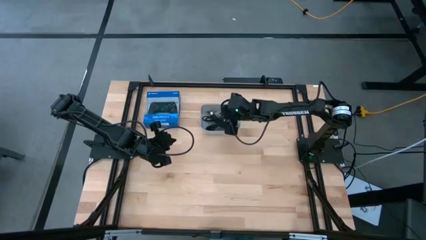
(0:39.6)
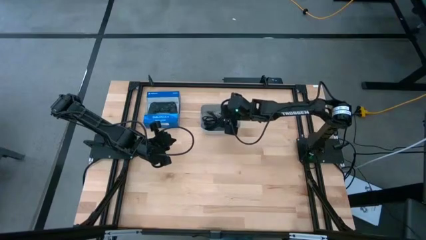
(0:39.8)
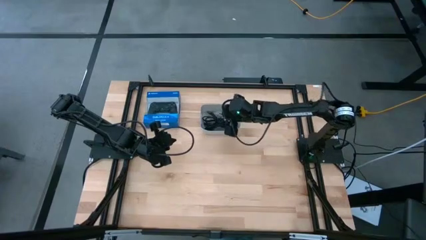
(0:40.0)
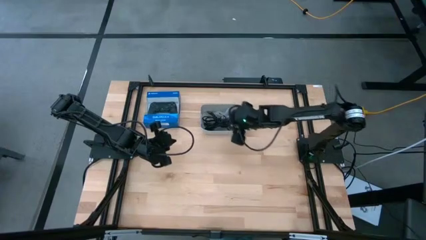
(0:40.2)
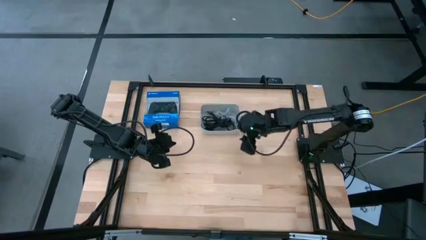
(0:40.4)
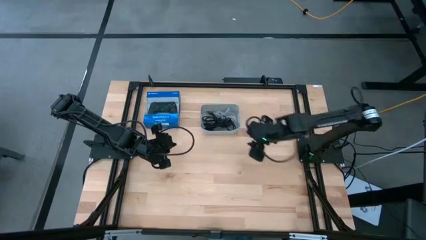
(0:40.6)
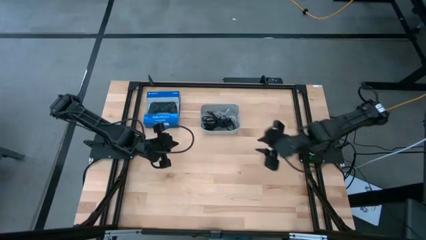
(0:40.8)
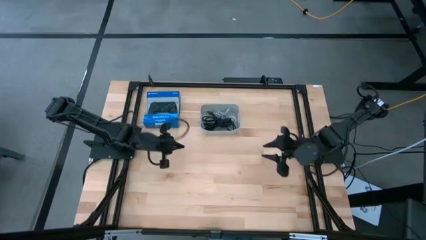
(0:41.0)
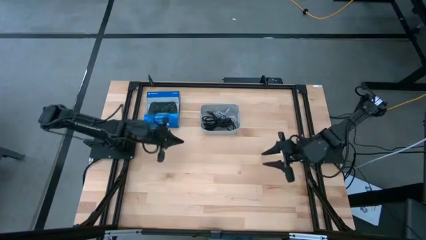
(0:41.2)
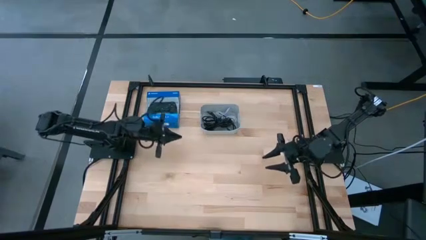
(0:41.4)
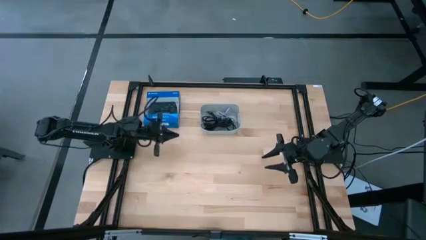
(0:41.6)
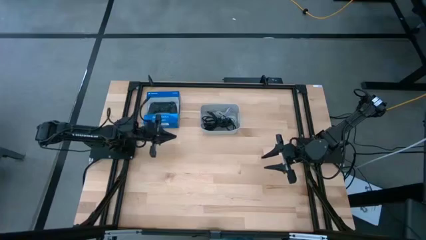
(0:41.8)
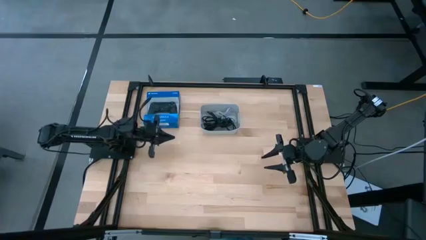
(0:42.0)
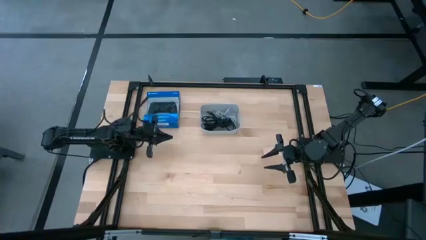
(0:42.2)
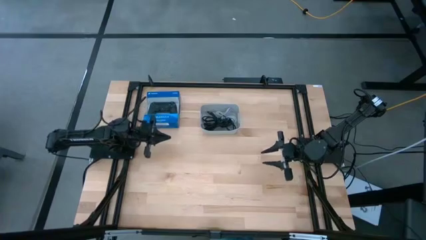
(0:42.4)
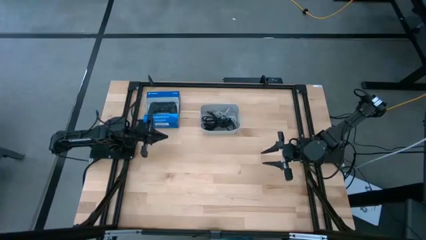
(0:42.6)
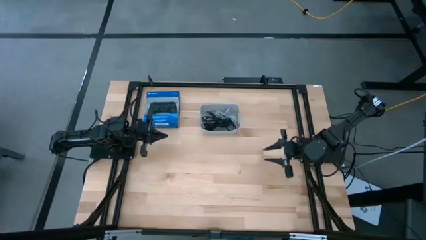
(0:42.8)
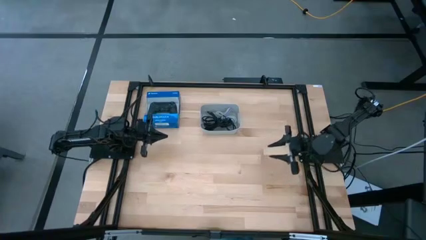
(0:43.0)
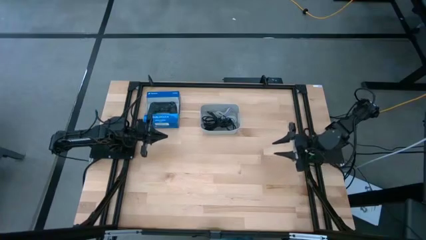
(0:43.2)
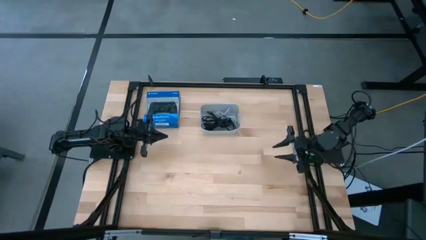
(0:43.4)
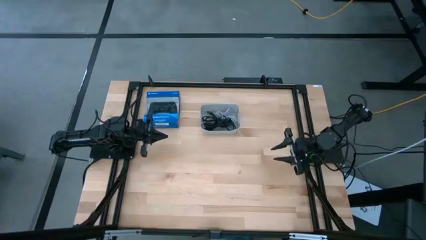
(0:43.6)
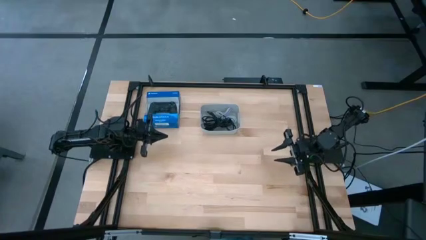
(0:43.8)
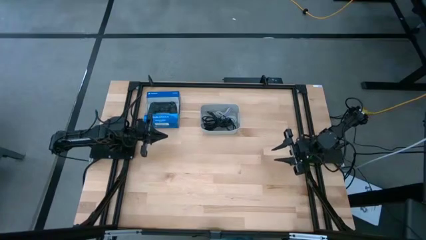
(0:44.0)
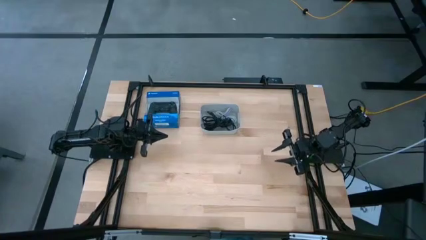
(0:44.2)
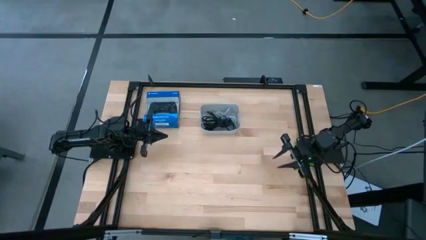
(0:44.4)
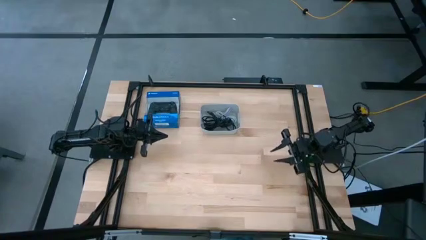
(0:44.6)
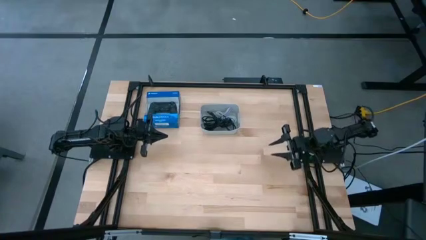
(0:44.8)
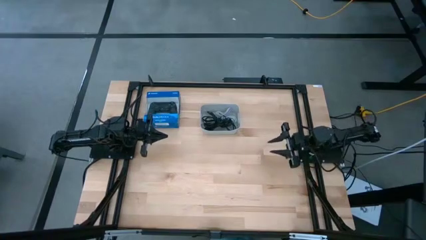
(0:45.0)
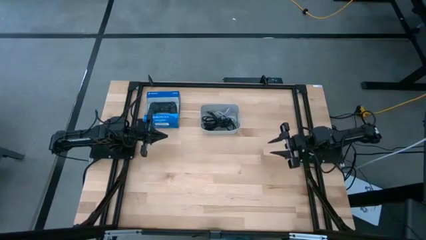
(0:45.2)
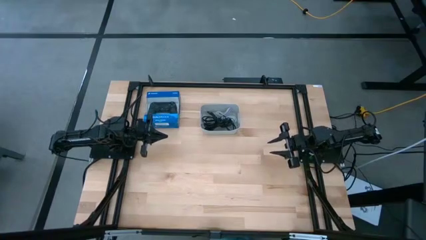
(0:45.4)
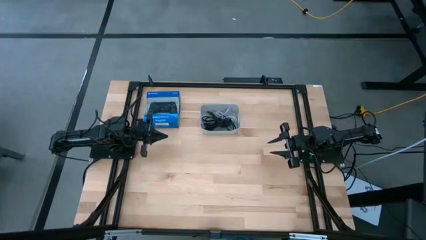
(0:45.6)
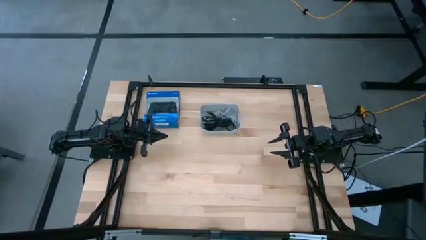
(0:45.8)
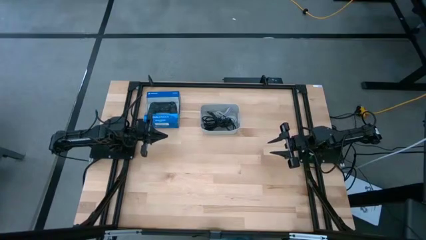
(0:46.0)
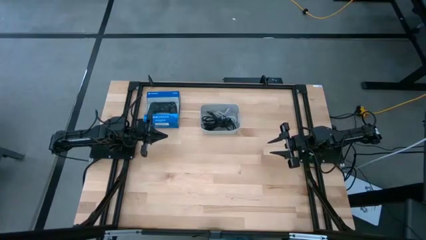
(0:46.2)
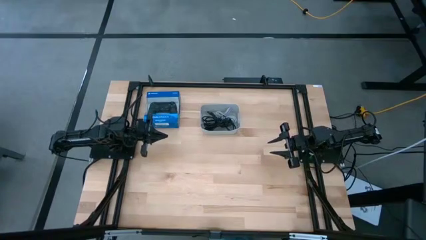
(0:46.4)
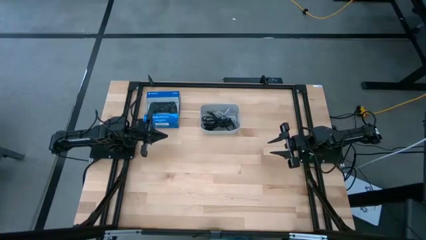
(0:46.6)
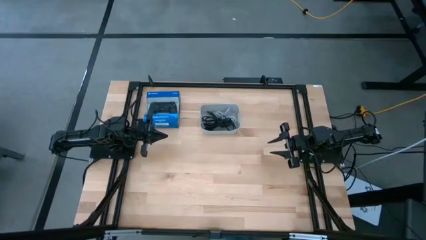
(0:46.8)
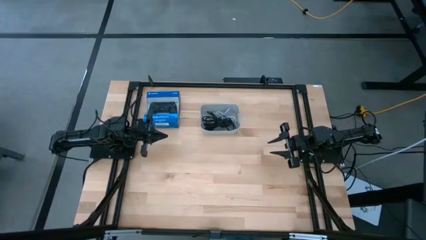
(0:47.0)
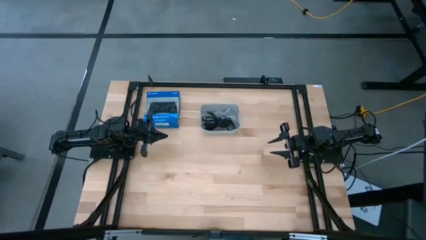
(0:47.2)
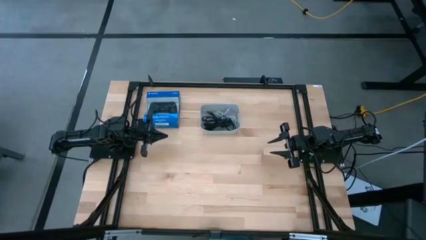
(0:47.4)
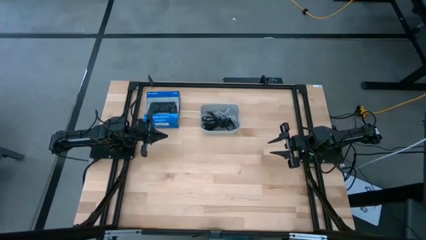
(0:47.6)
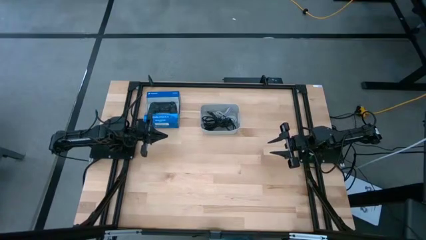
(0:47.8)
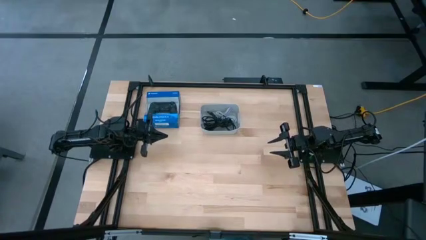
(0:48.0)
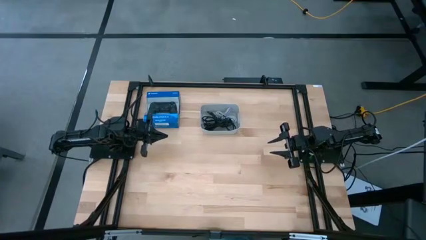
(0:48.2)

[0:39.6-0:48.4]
Task: Pick and place USB-C Cables
Return to Home Position

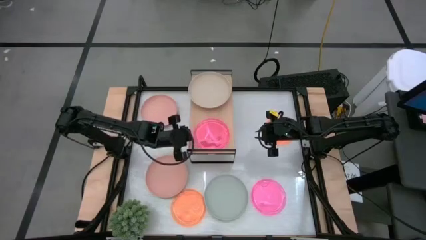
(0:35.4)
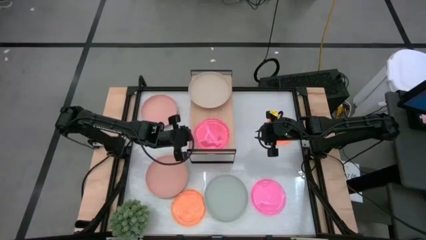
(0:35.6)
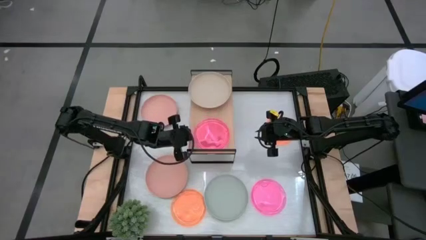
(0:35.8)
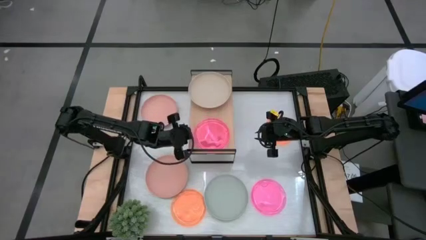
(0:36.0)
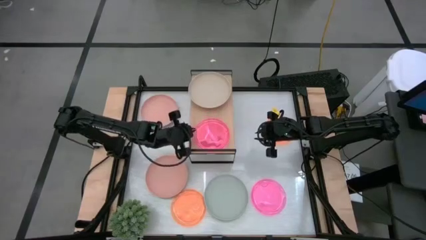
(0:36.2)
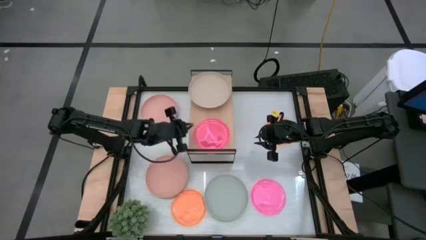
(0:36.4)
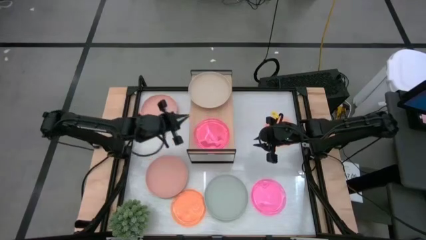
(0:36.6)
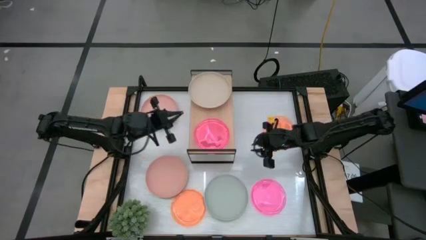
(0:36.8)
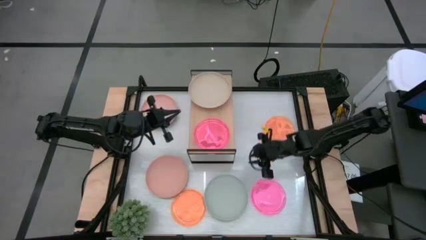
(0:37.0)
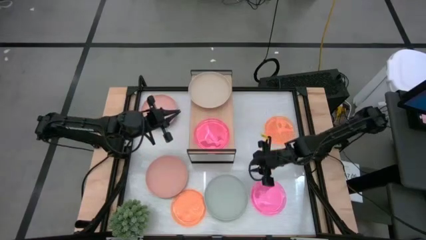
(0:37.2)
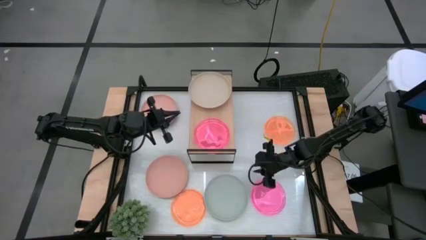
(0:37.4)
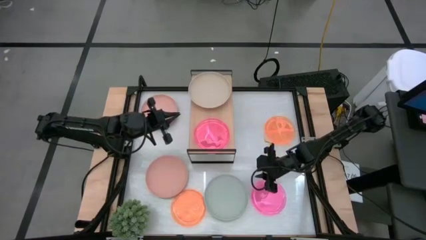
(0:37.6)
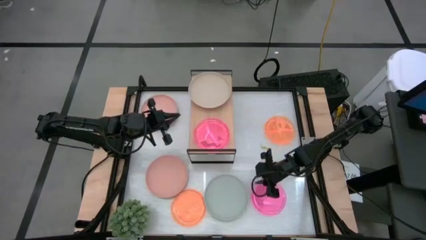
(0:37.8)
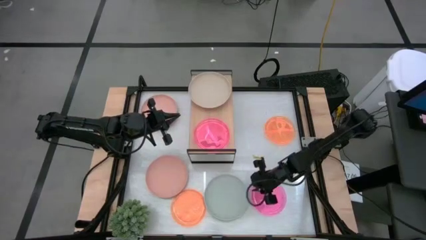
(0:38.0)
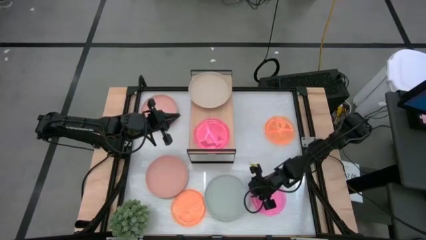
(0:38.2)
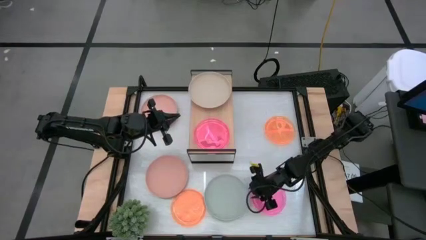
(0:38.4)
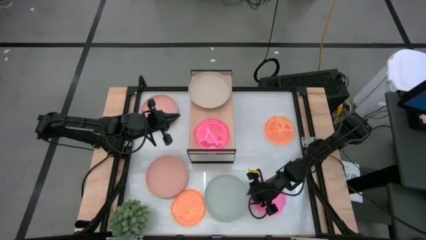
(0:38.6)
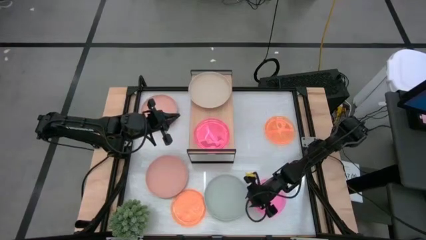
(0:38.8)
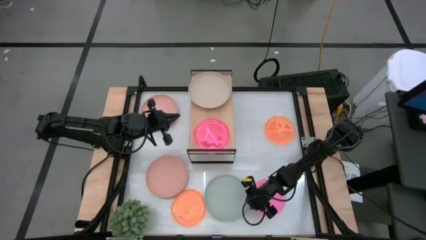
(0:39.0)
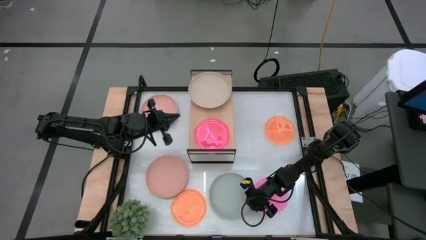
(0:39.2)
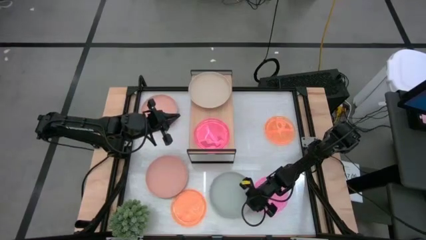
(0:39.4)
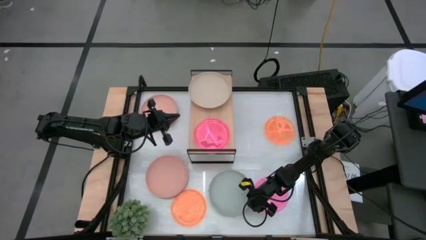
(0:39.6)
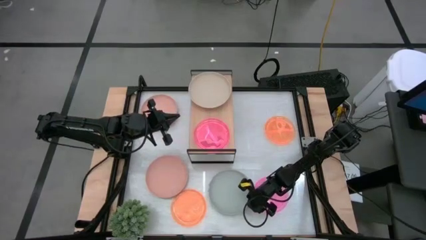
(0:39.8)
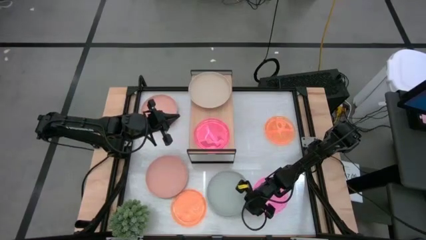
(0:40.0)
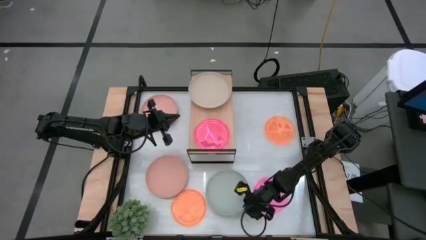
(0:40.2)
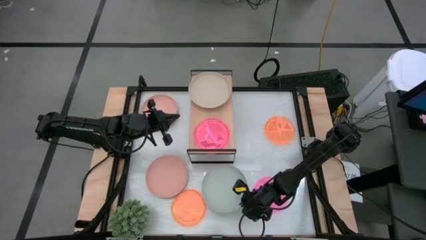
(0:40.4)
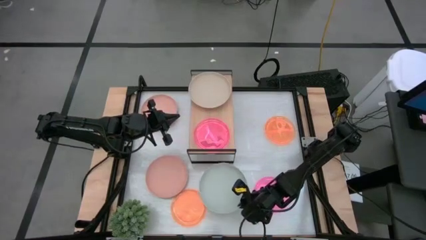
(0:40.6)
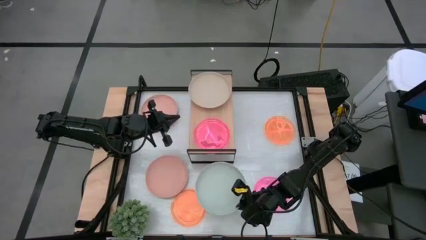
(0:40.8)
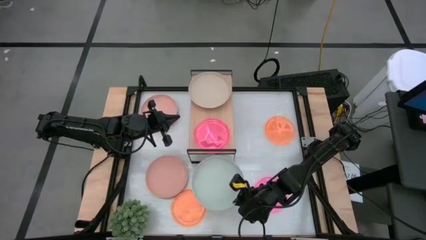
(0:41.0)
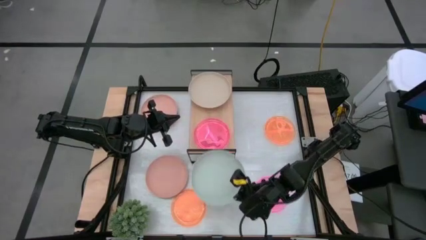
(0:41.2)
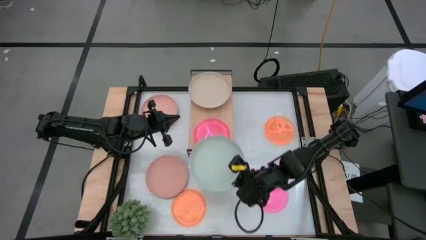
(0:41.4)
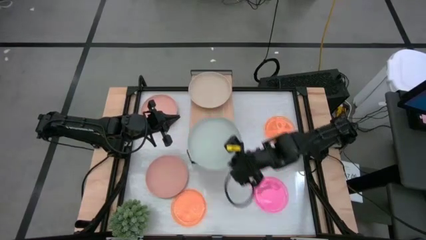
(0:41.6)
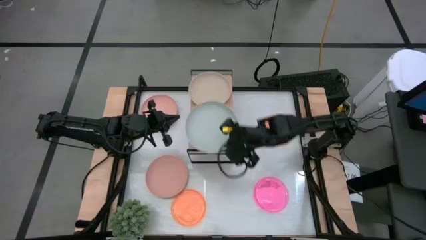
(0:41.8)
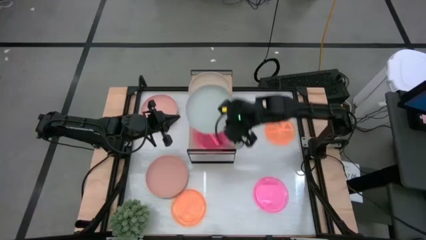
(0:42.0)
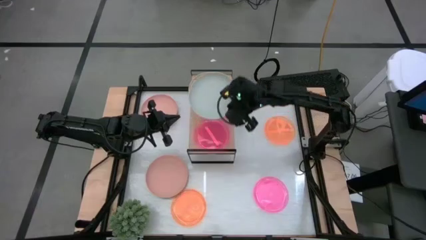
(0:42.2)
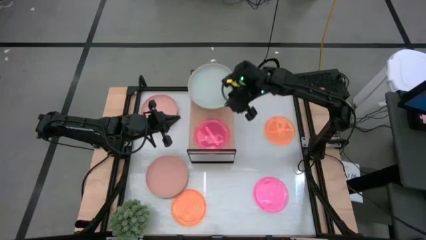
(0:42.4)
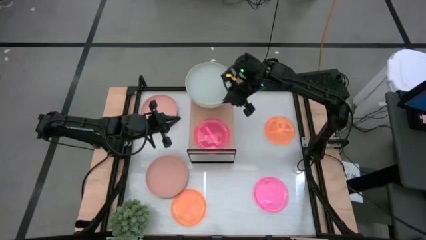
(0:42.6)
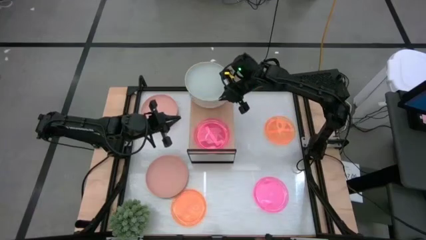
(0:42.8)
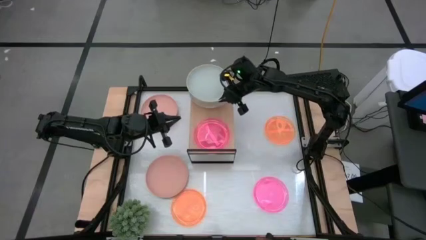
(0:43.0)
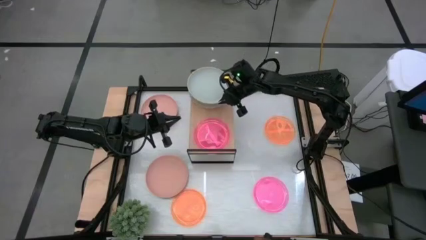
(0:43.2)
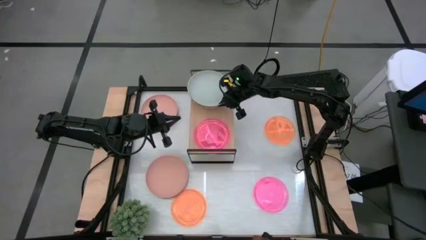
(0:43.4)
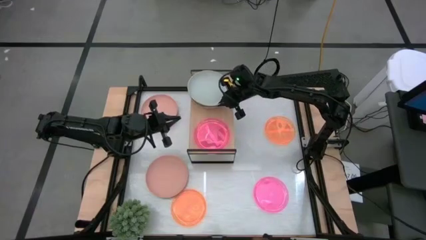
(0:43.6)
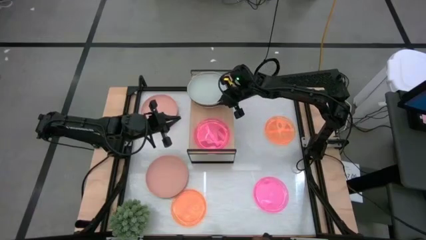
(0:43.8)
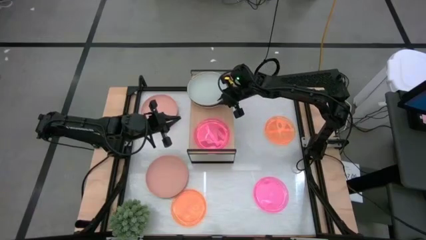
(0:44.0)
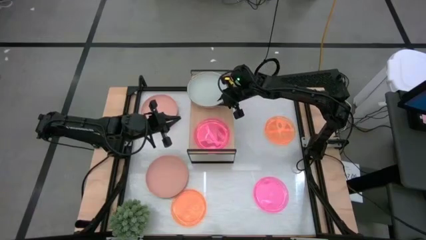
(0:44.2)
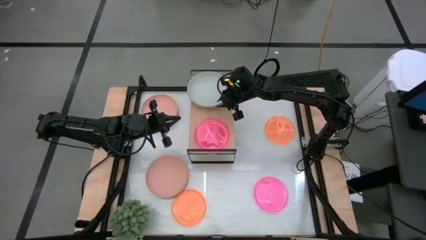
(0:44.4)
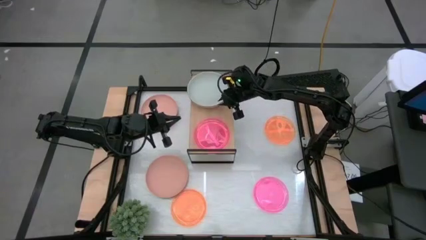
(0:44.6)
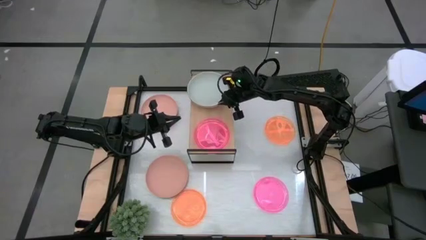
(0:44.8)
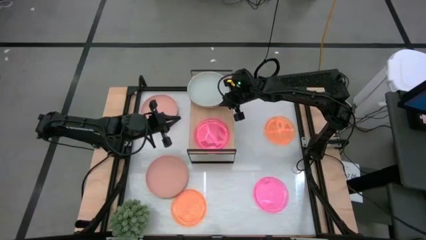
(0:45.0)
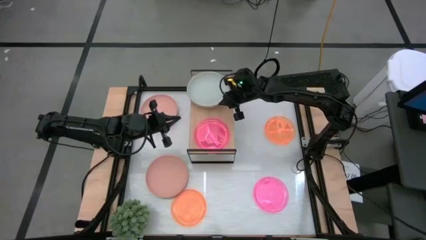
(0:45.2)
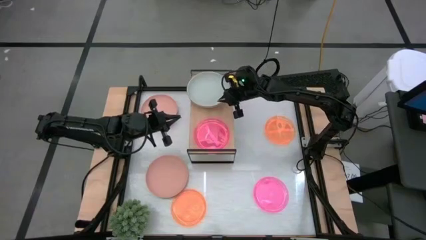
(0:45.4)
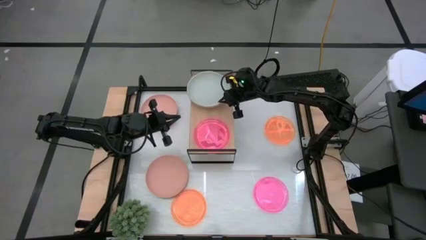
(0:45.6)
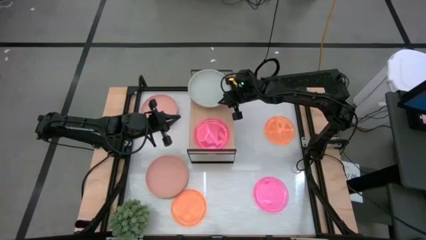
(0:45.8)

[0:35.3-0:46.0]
Task: Place and stack plates onto a shelf
Stack the gray plate on top of the brown plate on the shelf
